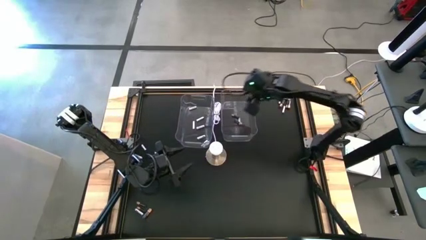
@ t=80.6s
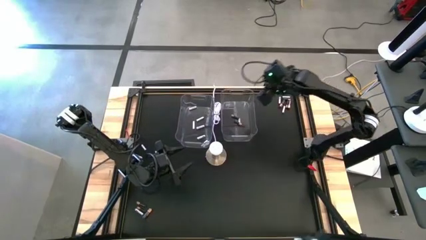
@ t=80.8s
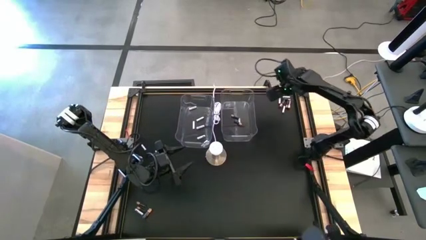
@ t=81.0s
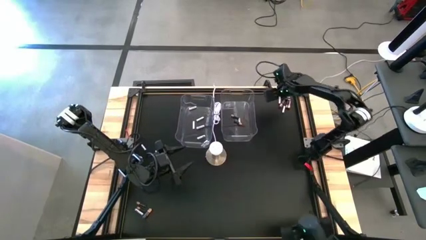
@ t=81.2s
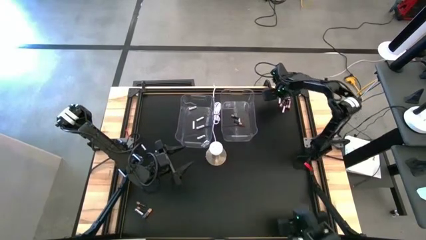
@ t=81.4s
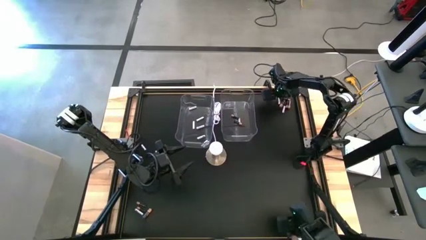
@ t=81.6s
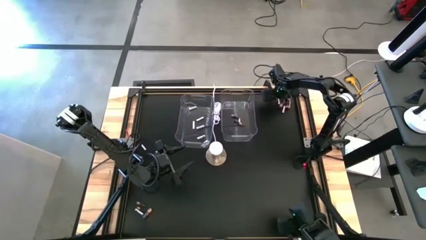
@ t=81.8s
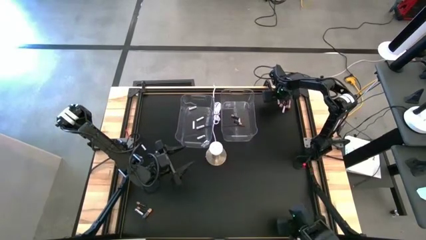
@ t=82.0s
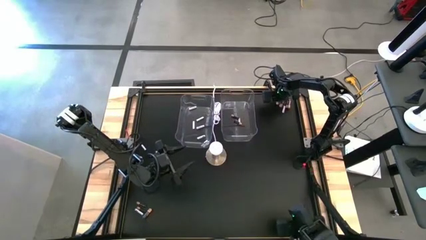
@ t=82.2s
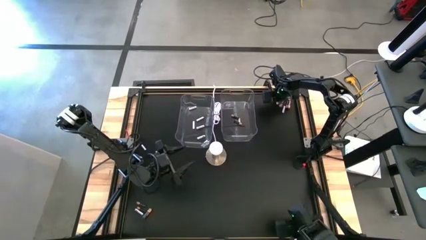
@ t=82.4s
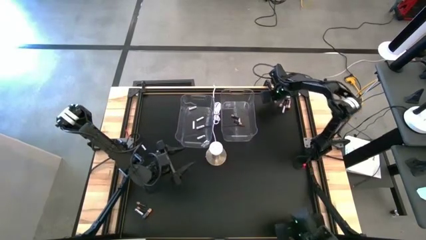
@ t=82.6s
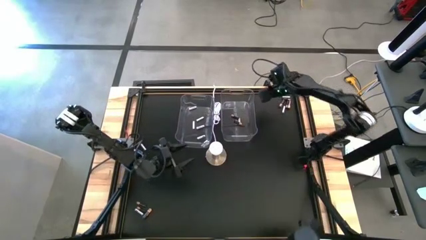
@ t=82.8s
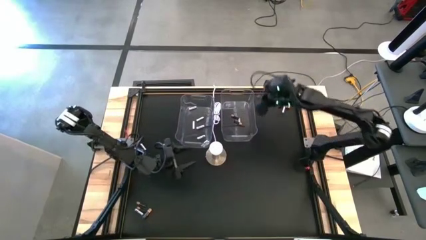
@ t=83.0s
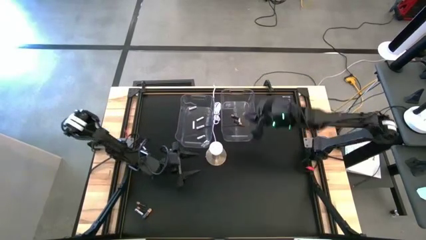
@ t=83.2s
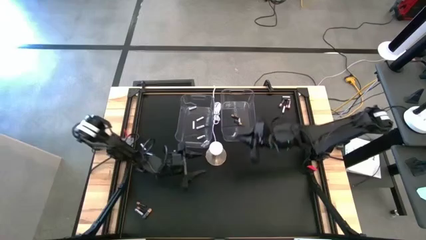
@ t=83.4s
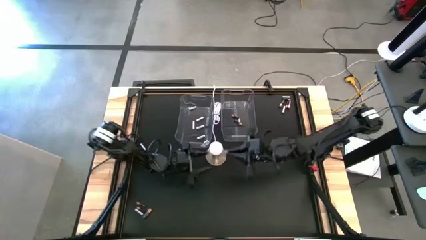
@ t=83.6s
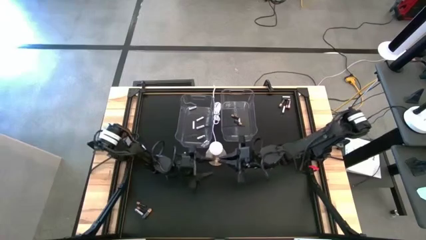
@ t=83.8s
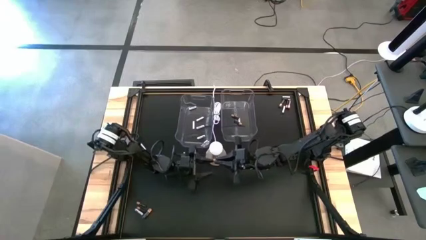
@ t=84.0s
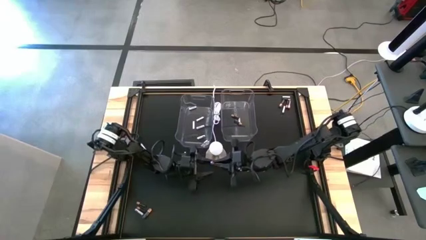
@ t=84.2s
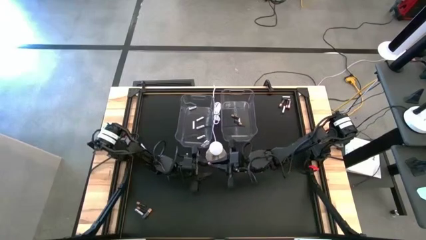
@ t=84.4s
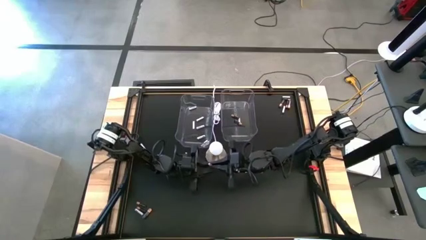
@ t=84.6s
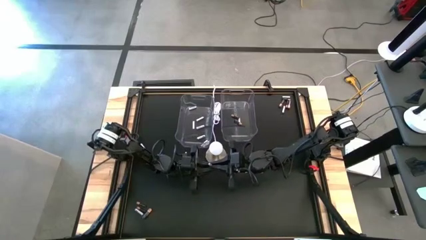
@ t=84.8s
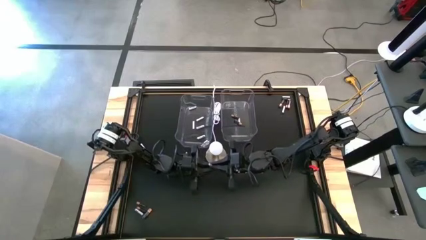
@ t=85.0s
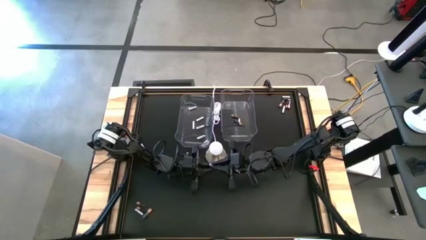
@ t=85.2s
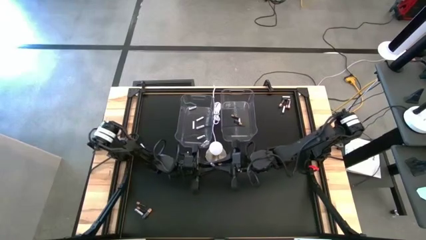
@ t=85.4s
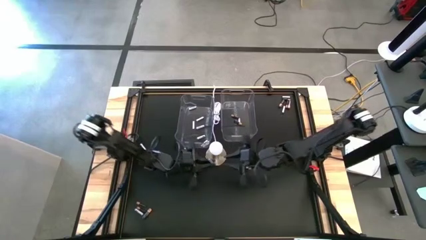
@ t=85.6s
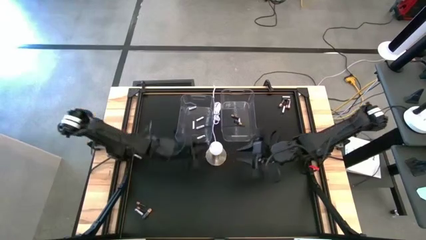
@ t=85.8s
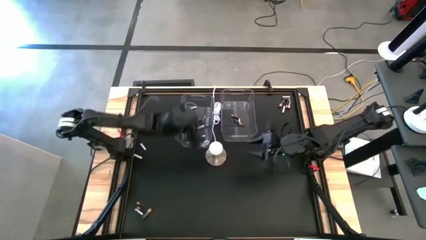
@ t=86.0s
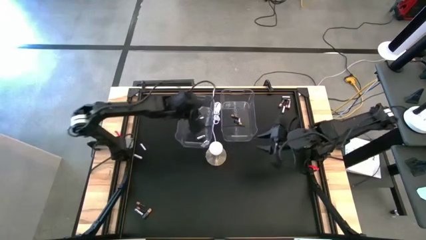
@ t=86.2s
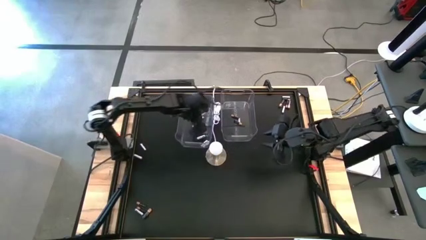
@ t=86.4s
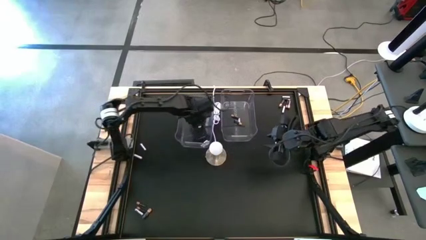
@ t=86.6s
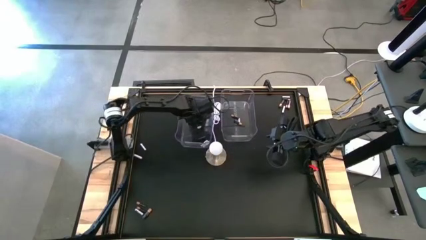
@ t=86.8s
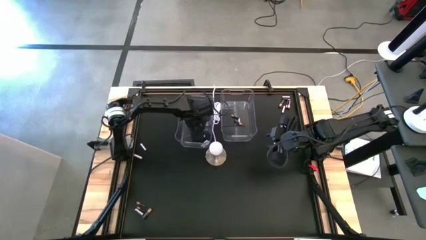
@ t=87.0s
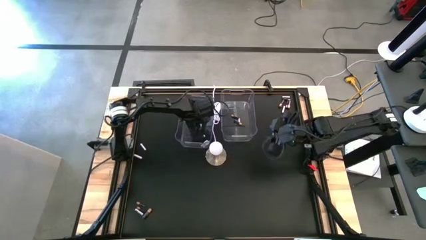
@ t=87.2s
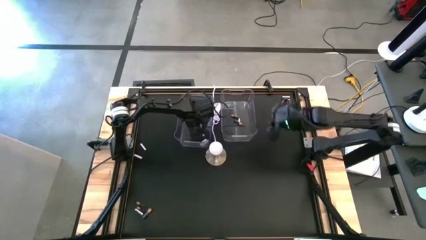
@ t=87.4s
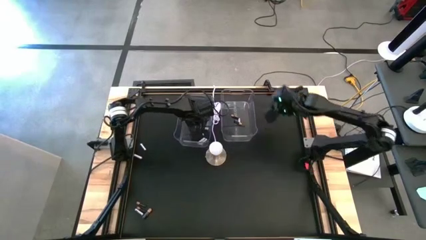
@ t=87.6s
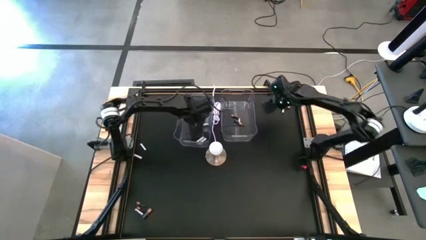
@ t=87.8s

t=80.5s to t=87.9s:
Task: Sort batteries
Put the white battery into the left transparent bin

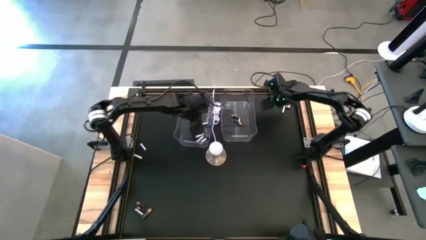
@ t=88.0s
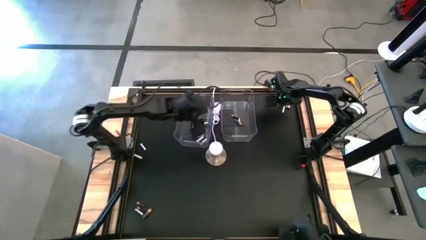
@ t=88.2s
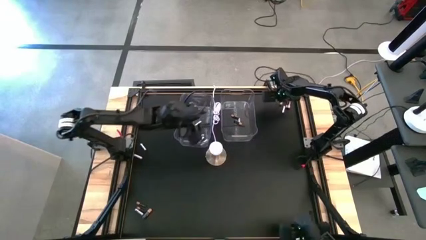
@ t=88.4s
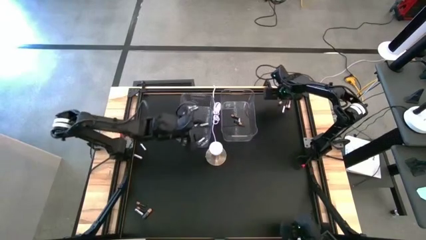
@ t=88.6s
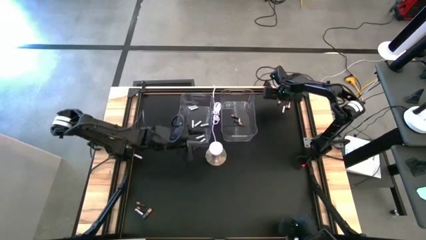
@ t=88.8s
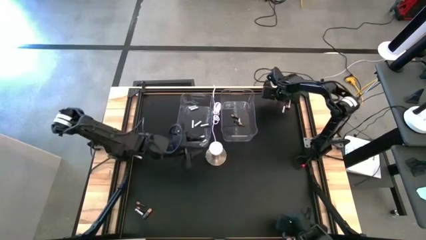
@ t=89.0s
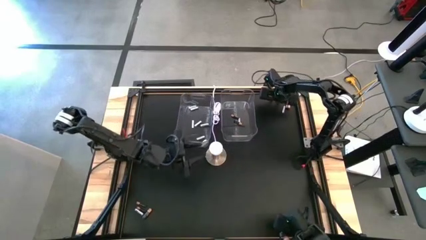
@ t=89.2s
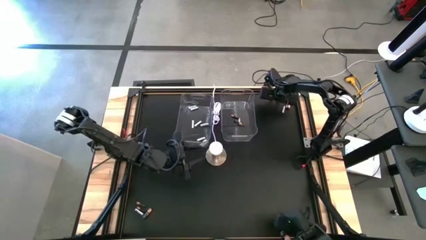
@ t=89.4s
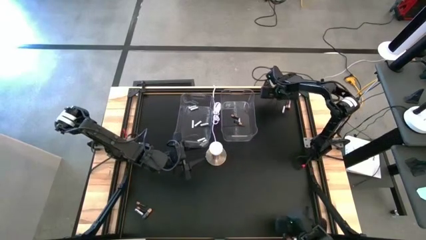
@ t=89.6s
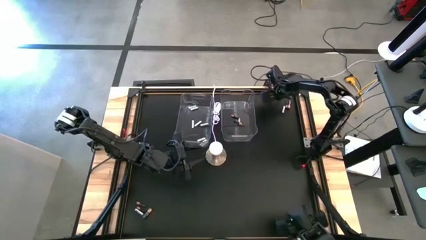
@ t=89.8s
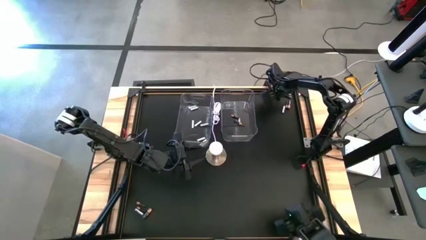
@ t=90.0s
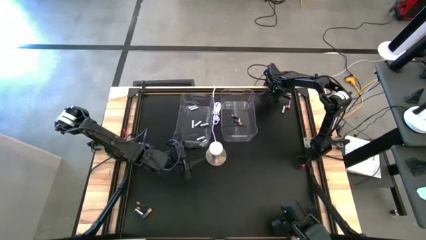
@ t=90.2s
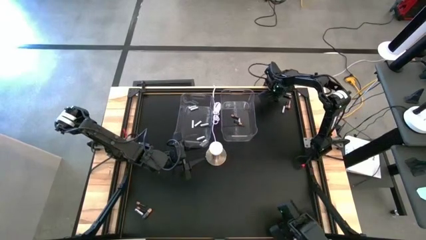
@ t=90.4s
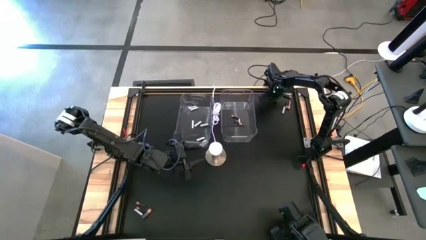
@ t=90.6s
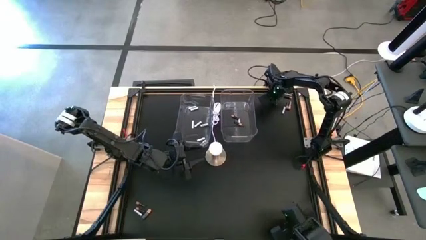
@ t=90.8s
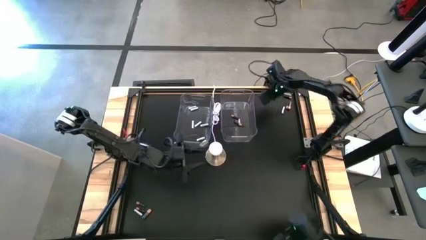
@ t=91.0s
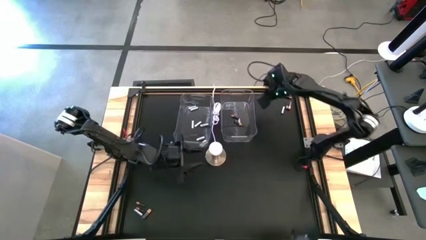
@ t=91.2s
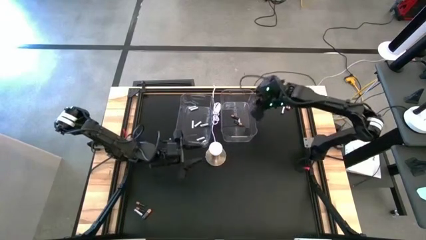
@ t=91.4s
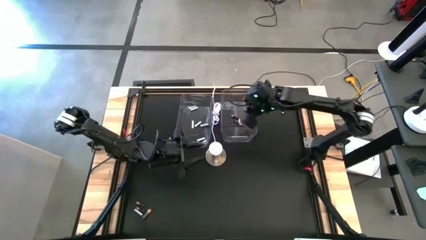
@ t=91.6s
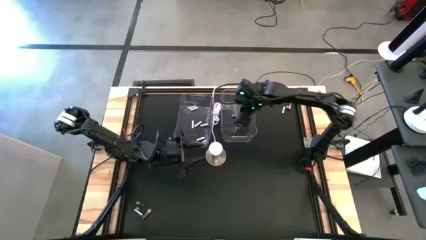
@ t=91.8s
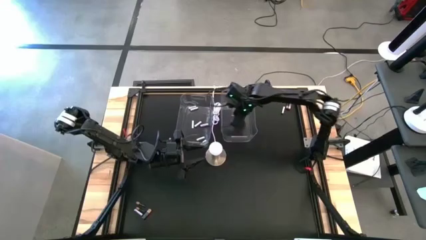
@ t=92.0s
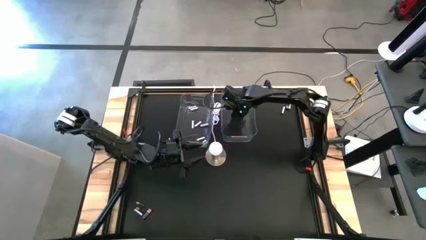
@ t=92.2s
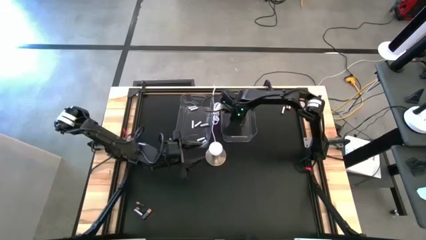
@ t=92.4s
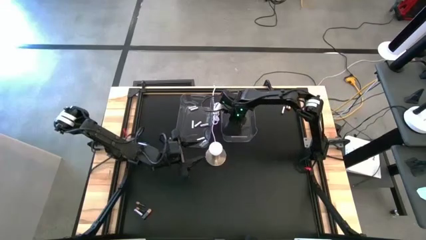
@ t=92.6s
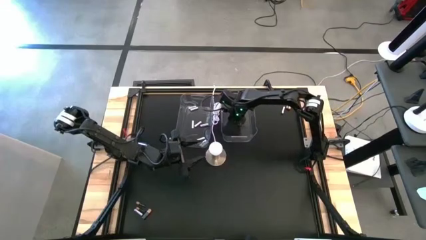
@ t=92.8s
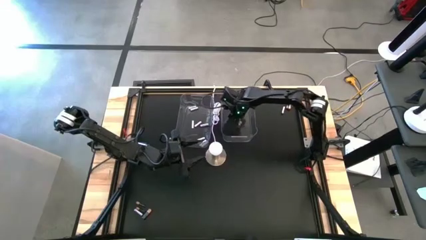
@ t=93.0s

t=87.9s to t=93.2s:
Put the black battery into the right transparent bin

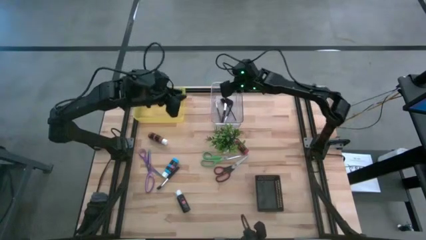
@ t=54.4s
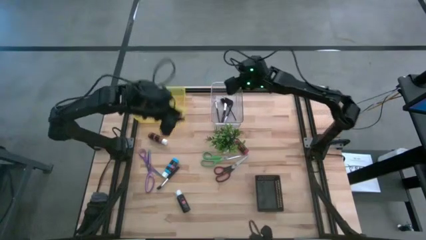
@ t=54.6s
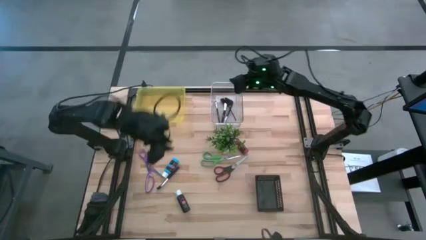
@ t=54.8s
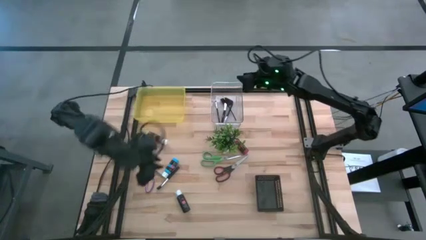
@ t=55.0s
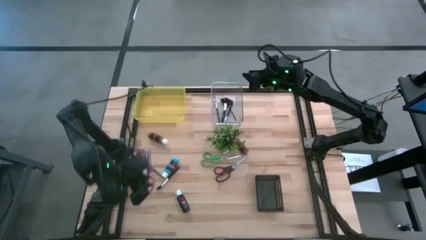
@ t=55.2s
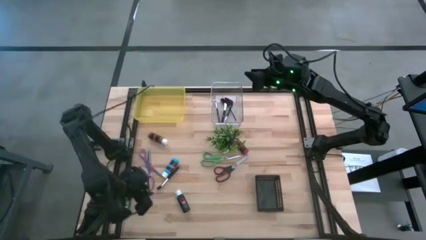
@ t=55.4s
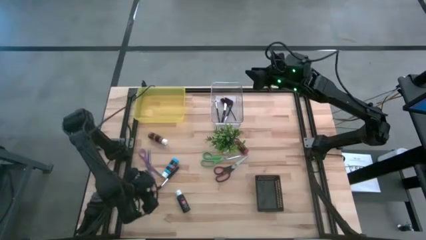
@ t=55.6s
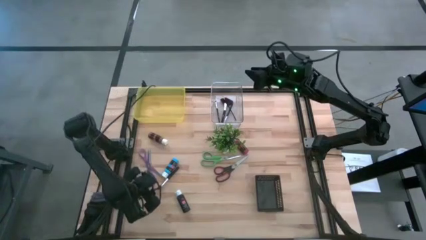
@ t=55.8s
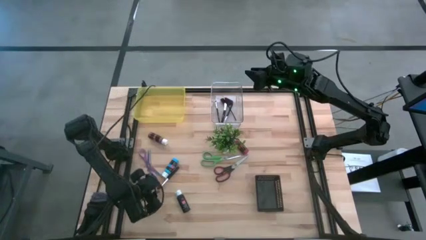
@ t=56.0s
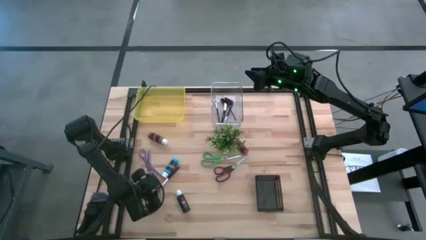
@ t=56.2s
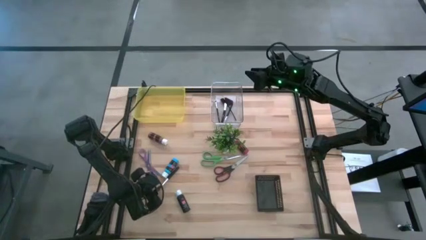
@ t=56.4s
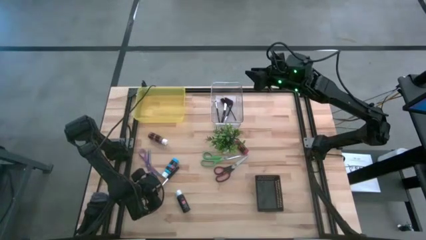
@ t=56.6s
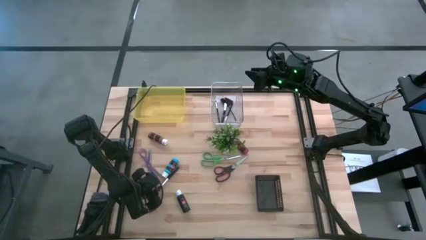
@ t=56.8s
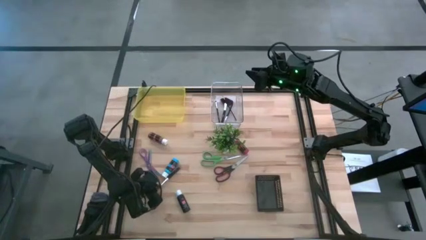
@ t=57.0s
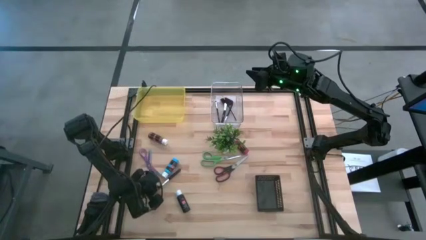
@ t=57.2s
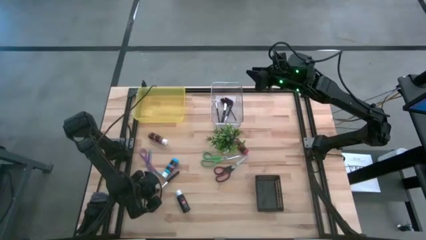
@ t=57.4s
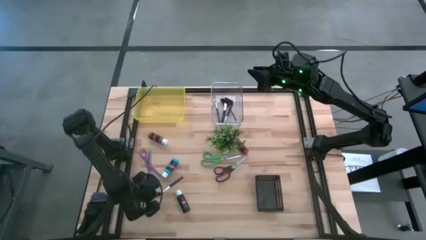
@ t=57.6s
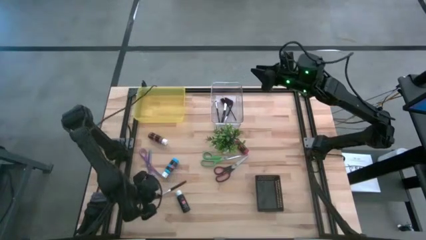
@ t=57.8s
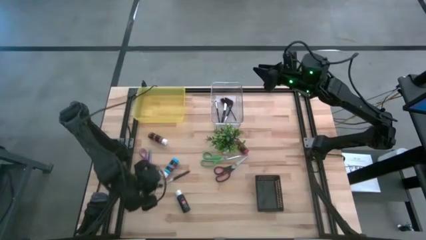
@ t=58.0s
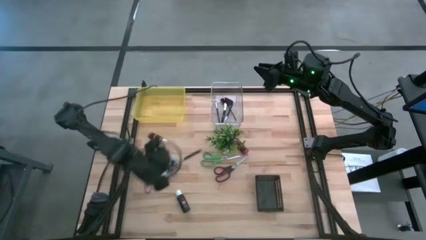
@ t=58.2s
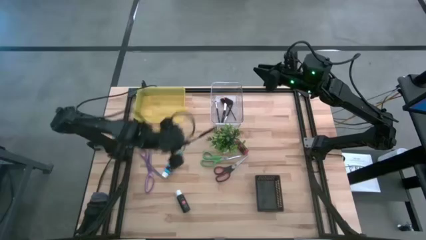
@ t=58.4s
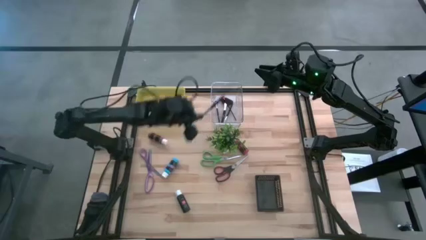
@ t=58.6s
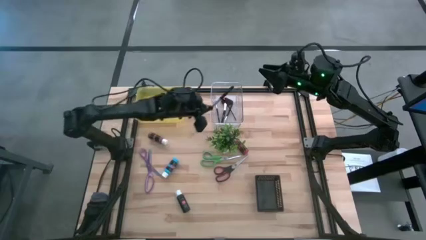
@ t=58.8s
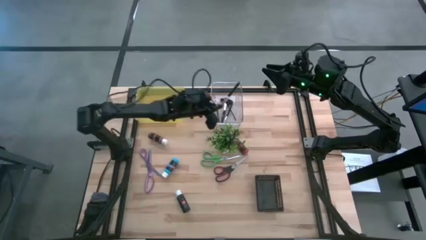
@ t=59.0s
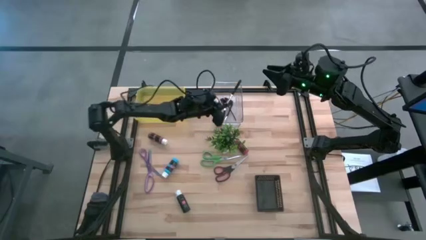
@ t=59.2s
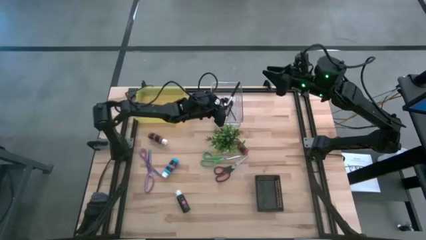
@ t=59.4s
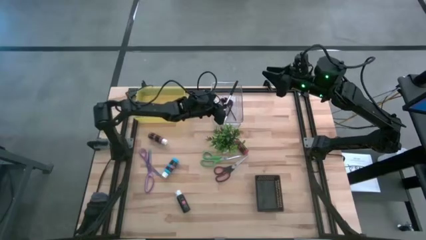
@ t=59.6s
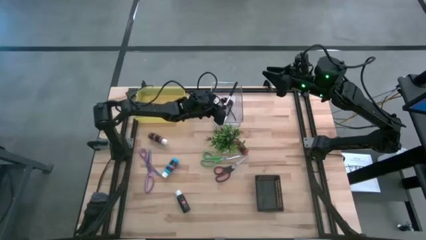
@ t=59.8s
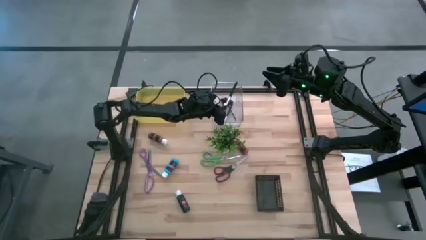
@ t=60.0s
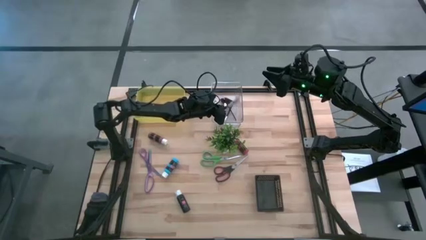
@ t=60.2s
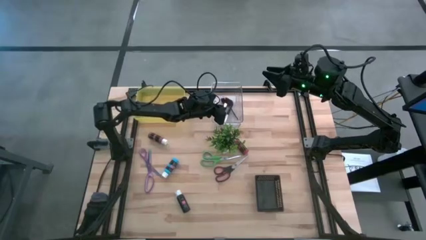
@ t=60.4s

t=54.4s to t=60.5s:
Task: Pick & Place Paint Supplies
Put the foundation brush into the transparent bin
